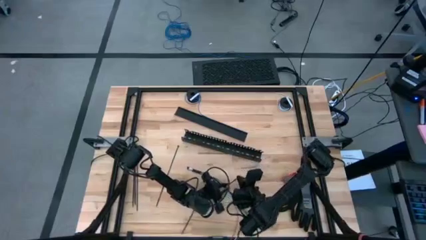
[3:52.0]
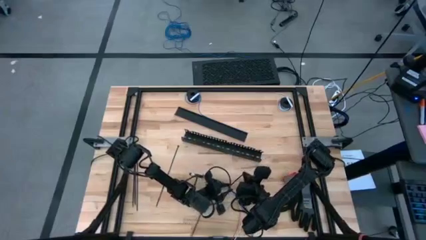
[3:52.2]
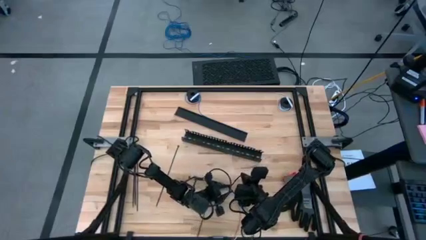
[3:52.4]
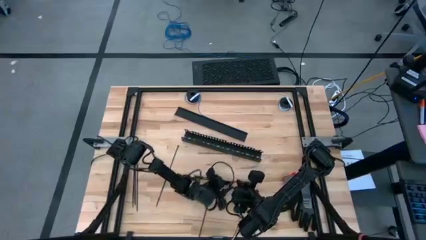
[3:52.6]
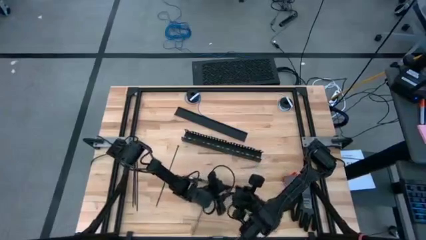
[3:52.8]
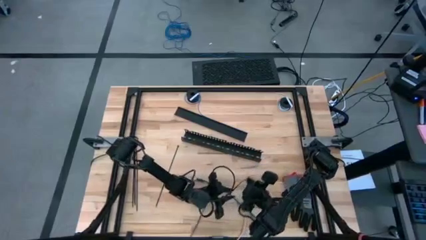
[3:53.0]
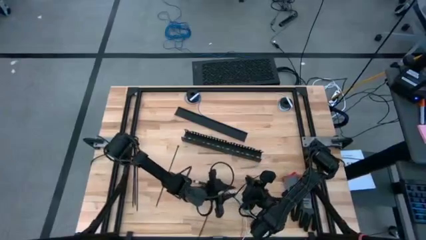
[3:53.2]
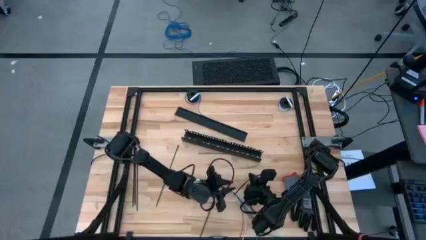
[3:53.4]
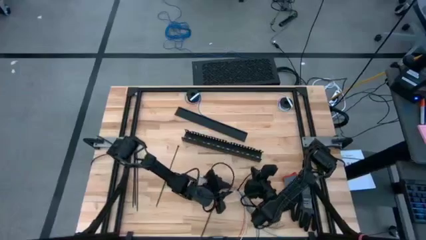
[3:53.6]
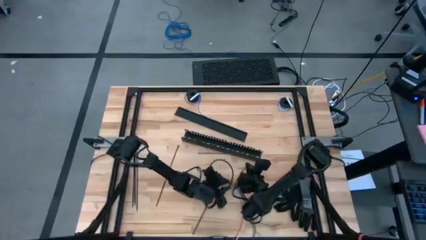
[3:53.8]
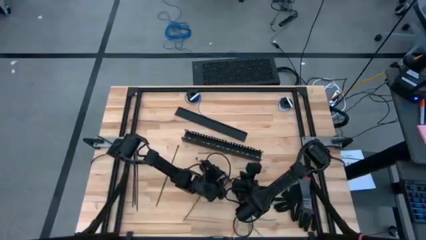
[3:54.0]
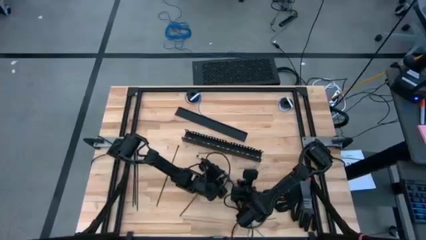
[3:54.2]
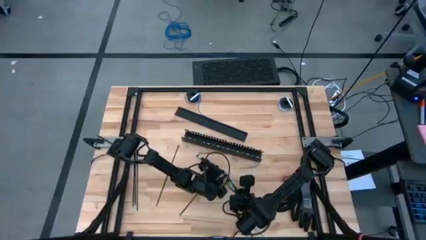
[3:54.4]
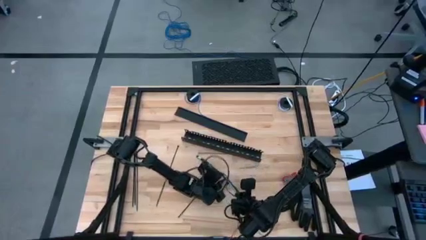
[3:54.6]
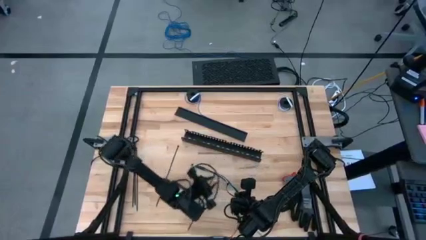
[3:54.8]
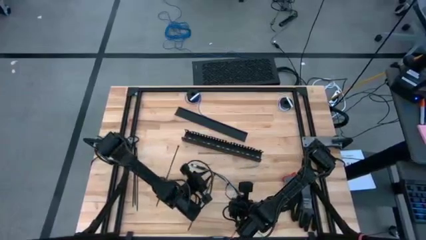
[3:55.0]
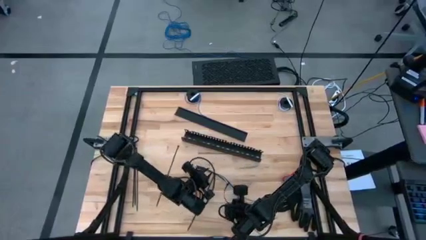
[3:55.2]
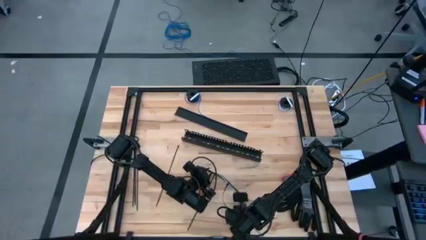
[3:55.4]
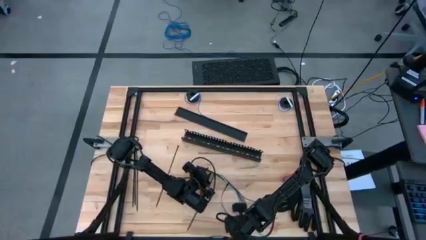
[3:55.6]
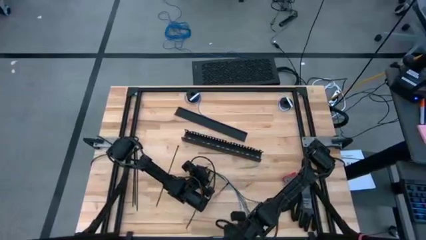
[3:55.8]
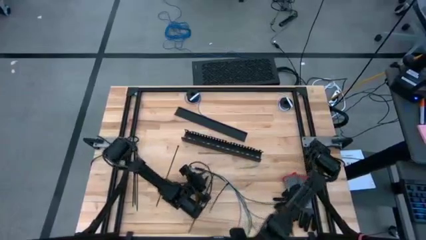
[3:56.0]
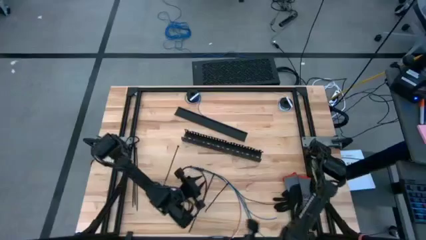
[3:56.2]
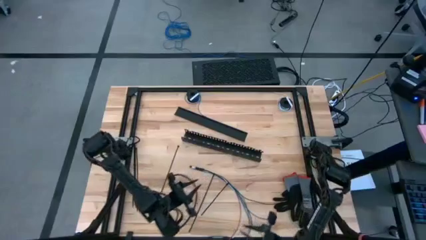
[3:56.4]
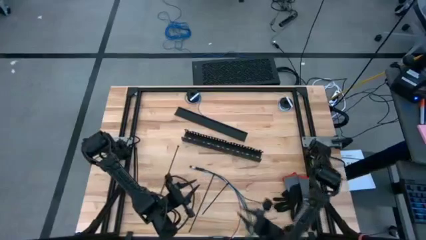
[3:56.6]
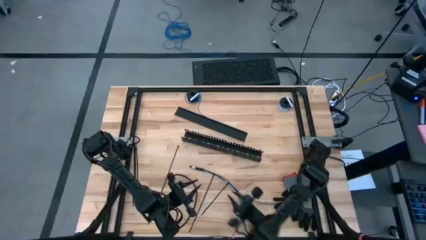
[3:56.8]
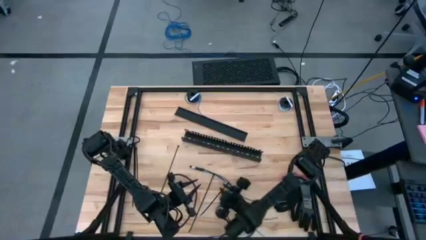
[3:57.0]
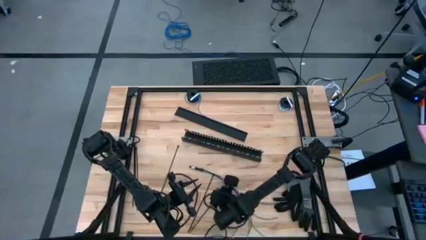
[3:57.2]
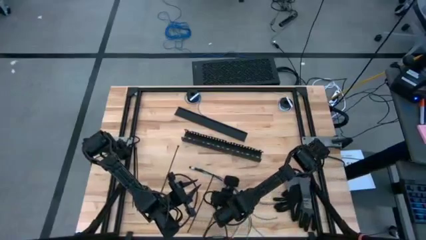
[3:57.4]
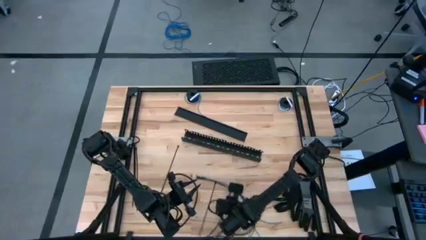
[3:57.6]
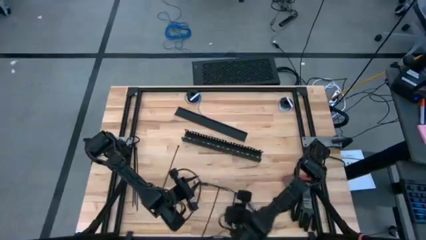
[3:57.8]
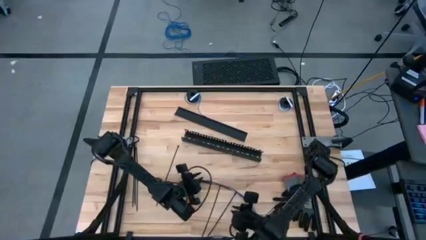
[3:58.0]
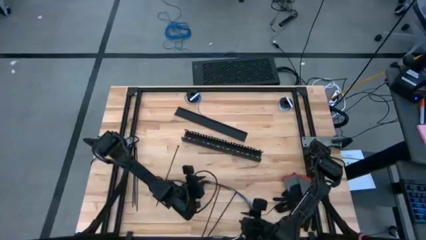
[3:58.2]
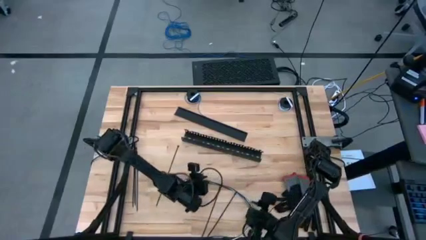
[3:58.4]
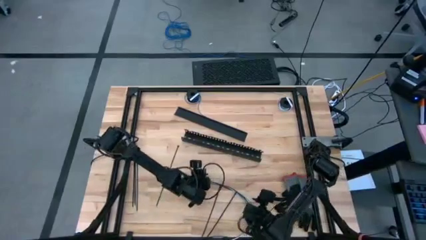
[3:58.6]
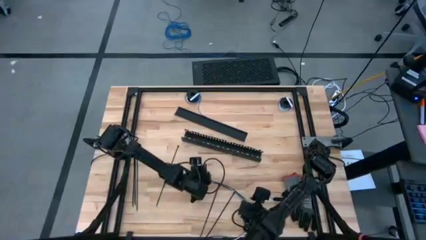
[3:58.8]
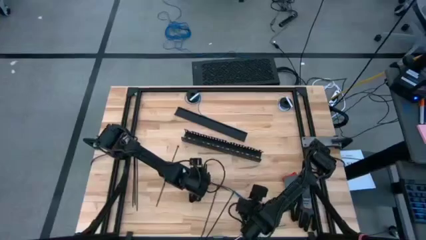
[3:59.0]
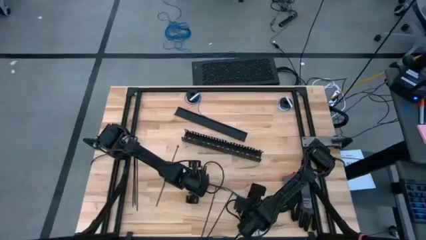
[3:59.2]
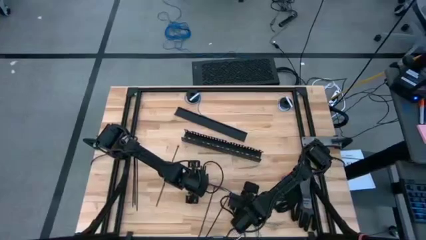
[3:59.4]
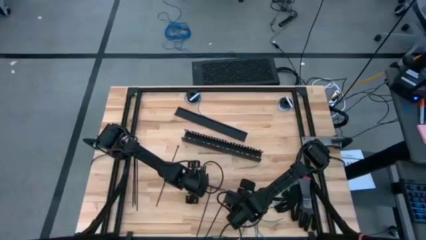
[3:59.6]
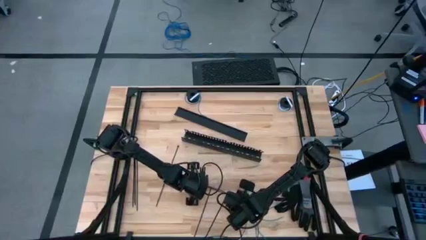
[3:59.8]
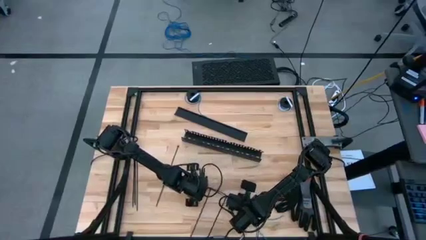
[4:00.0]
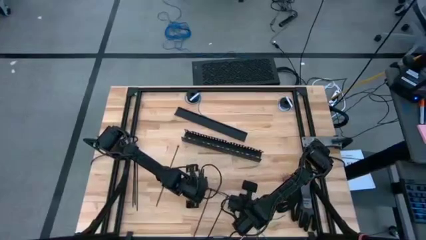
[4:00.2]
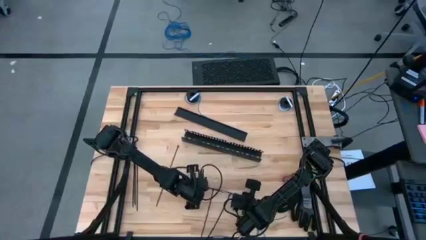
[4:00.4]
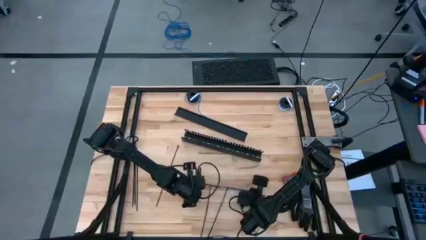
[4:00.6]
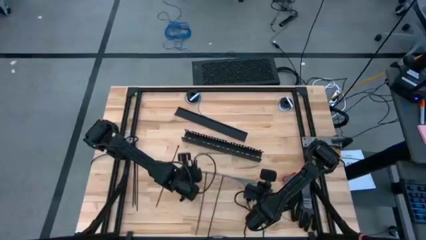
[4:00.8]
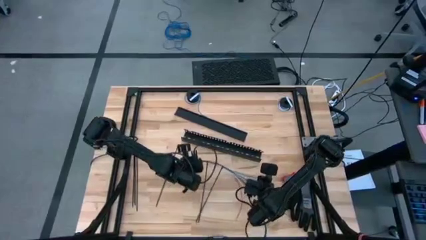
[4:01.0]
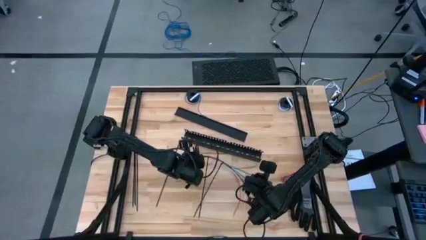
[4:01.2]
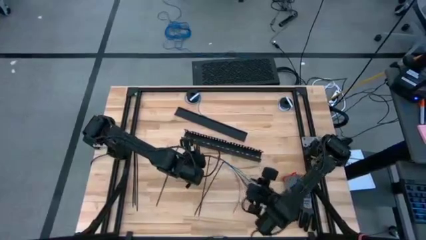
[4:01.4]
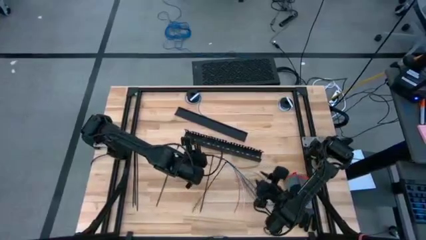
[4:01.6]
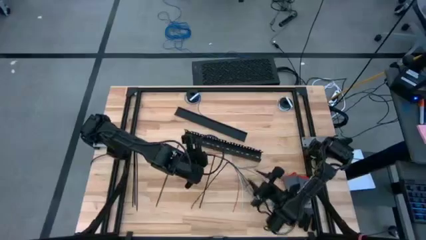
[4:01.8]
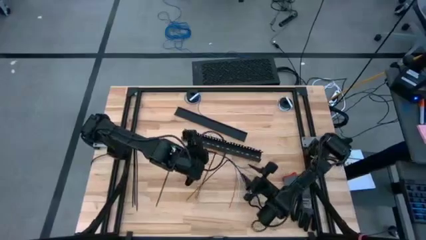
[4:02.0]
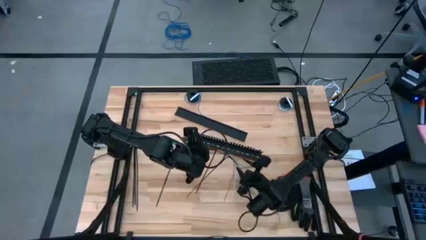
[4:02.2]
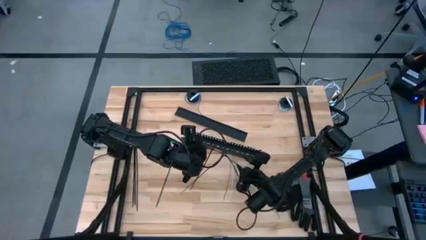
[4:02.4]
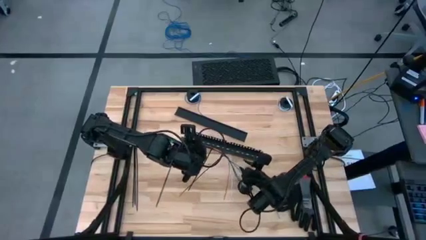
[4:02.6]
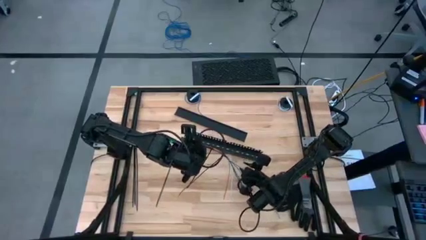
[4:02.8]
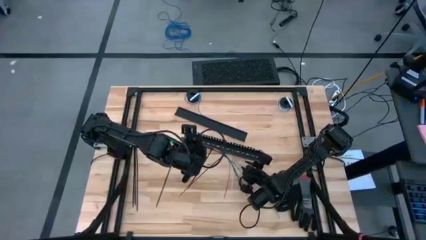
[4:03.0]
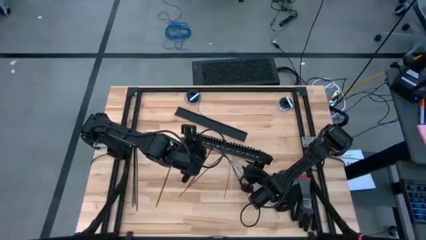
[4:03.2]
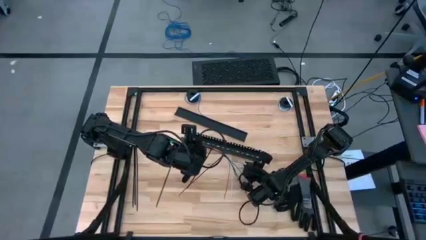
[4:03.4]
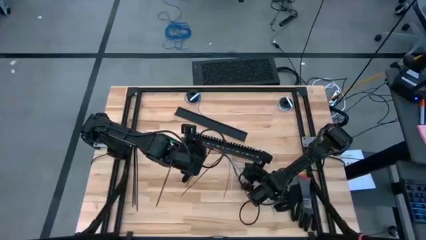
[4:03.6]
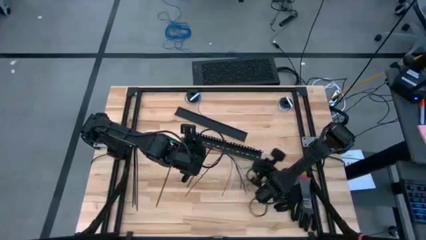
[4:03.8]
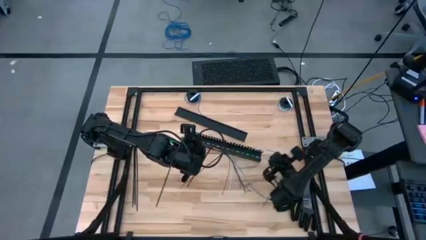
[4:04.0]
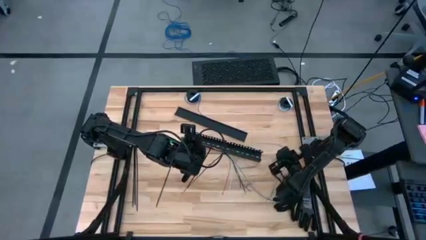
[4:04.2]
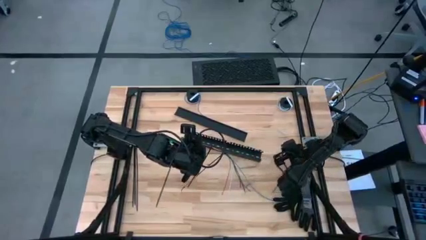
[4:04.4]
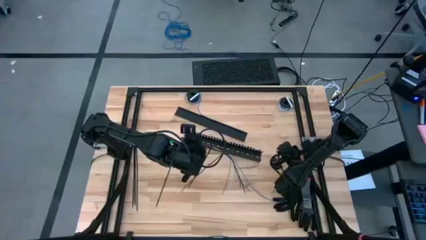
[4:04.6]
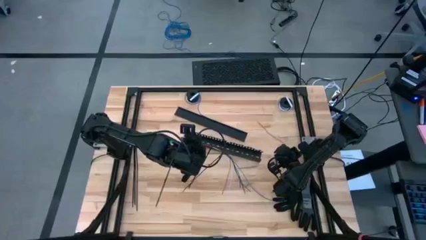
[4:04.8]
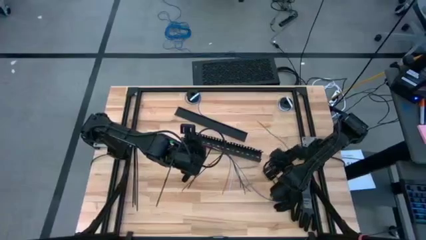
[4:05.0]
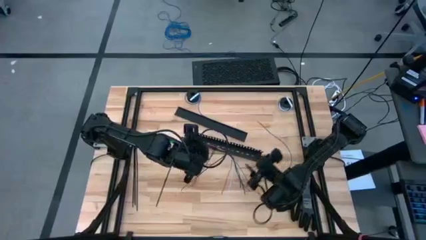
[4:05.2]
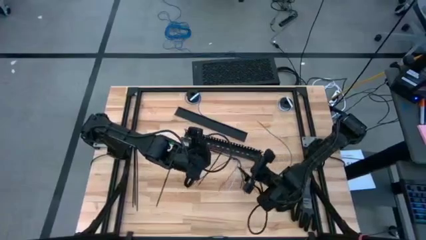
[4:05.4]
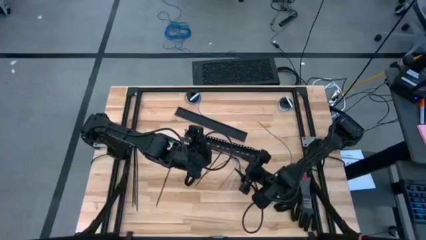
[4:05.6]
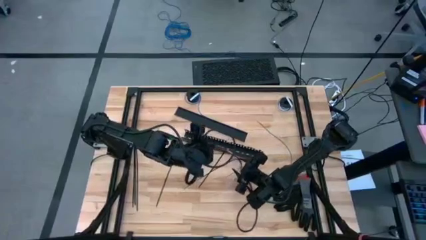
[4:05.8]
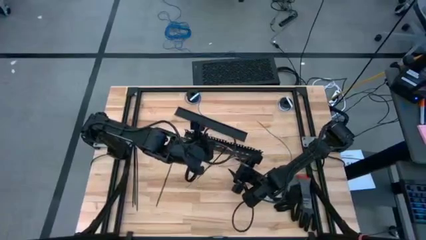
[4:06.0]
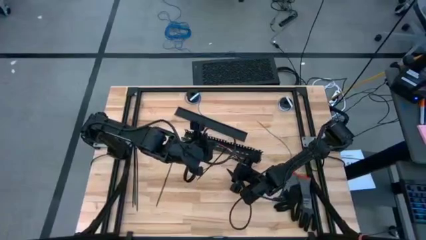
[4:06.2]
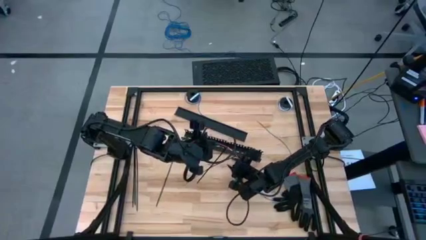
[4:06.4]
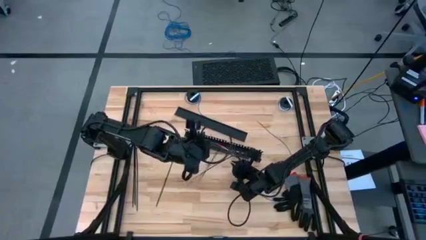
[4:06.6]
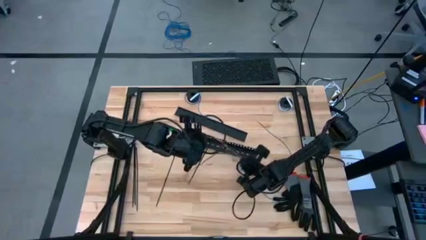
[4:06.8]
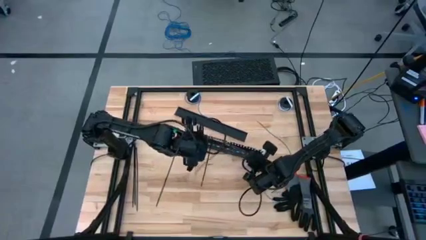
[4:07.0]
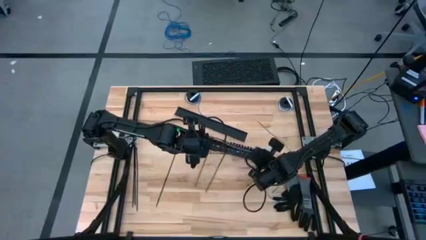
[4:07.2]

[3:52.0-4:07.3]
Task: Ziptie cables
Put the zip tied cable wire into the black cable duct
